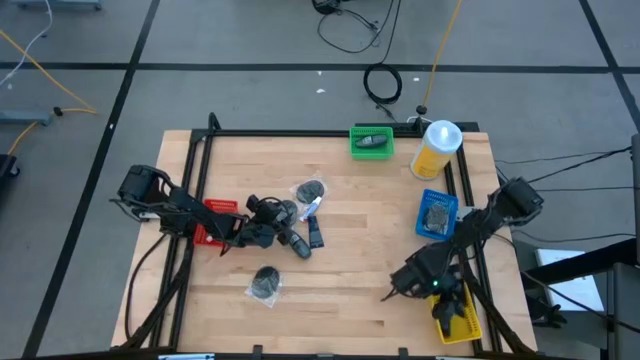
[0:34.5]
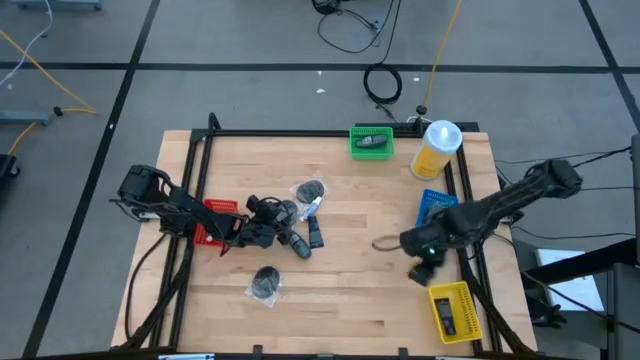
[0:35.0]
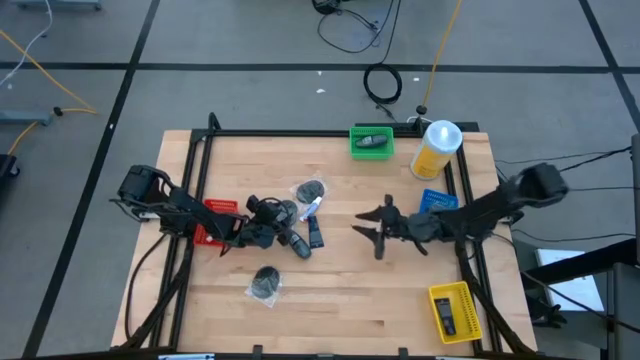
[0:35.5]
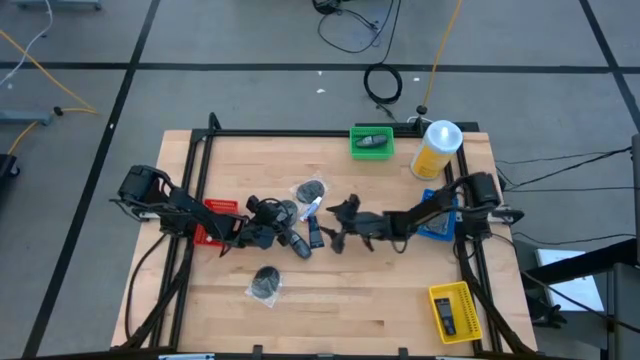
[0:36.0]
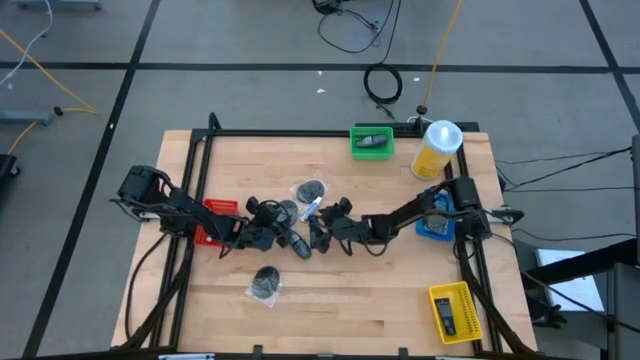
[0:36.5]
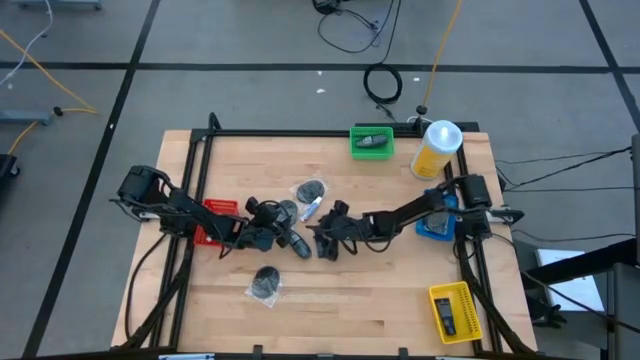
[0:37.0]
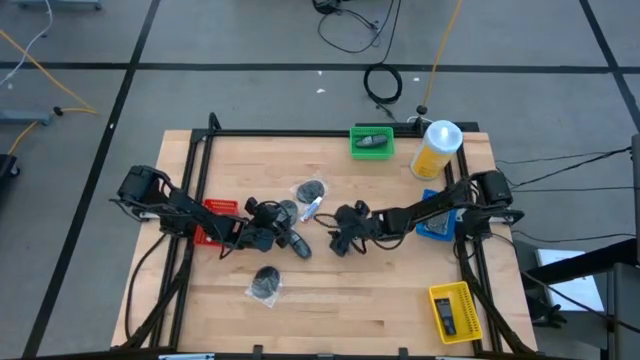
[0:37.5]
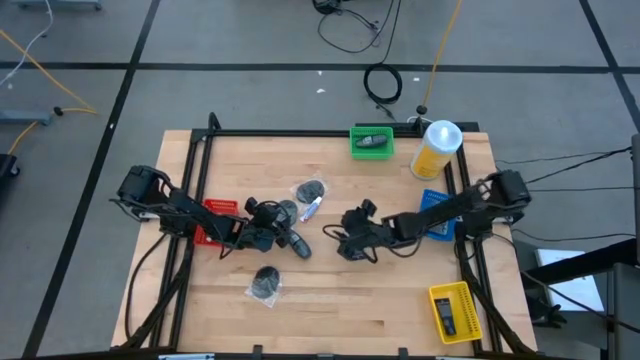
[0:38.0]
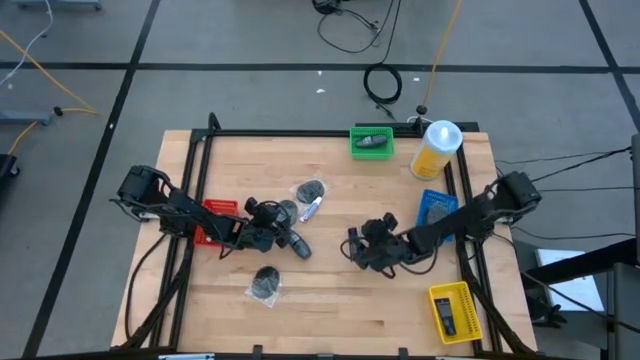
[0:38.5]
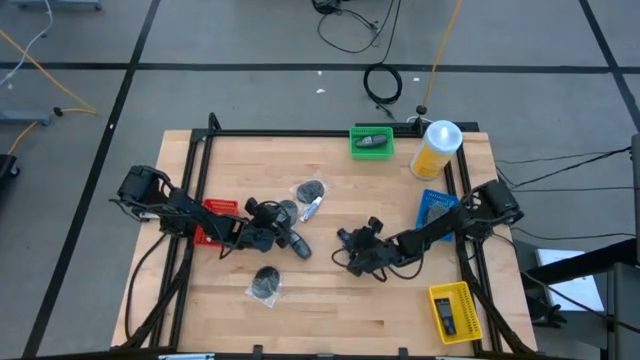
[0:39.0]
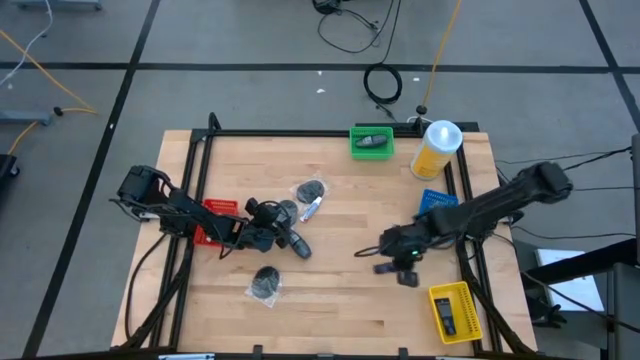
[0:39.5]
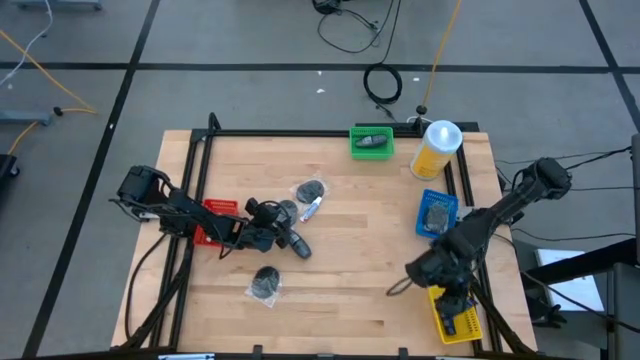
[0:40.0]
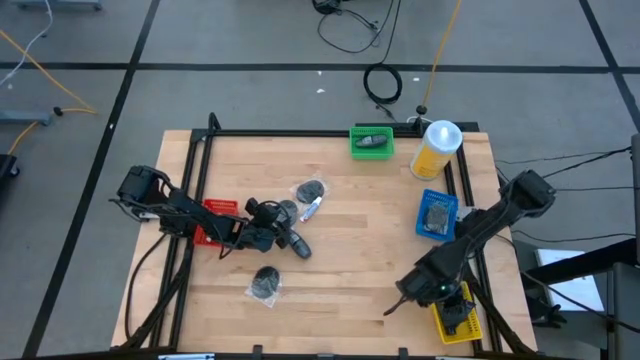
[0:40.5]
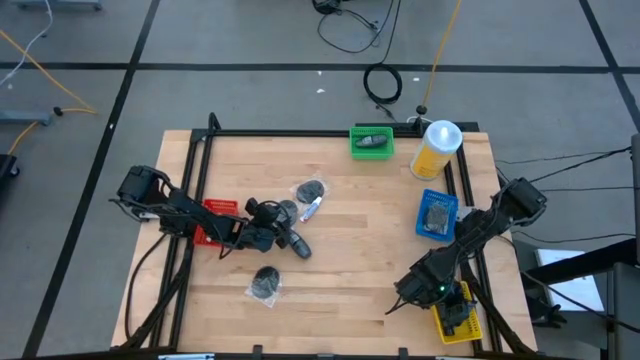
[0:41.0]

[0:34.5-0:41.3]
Task: Pick & Place Travel size toiletries
Put the blue shave cream into the yellow bin

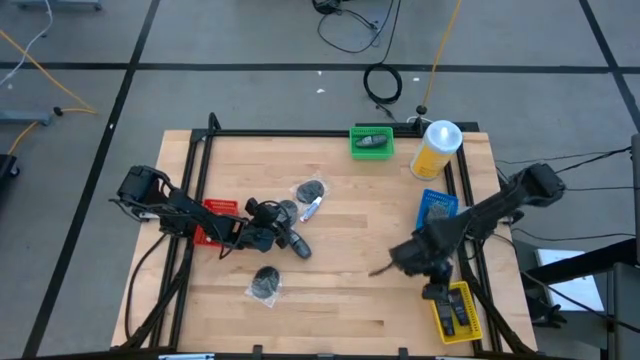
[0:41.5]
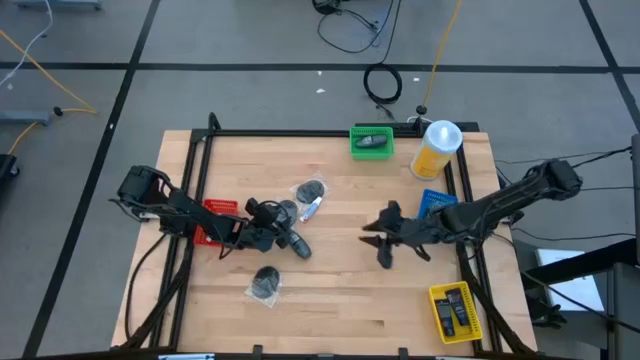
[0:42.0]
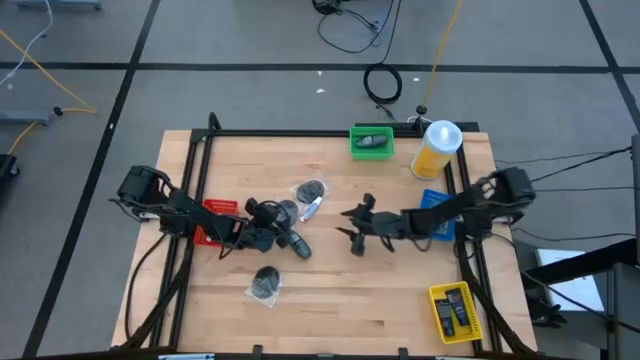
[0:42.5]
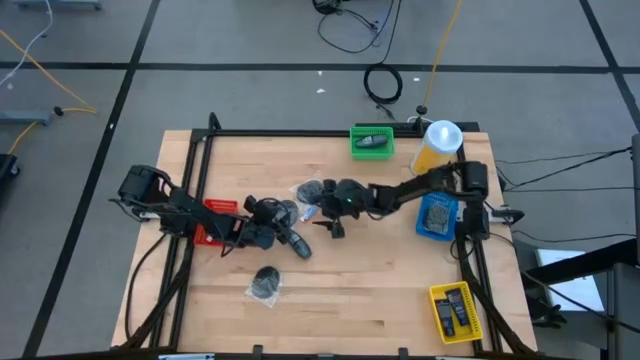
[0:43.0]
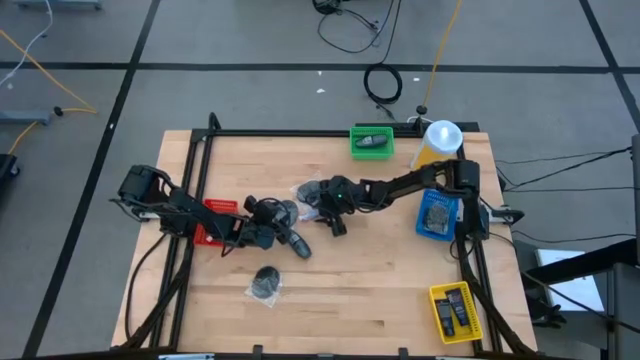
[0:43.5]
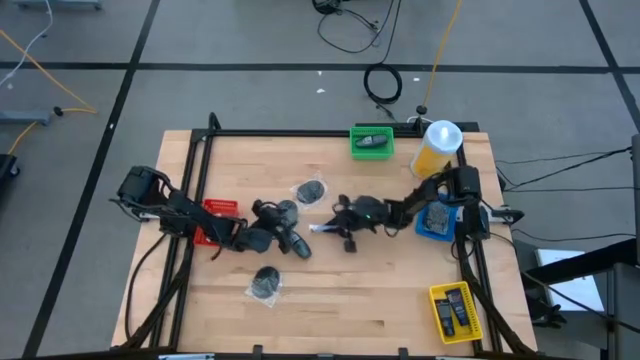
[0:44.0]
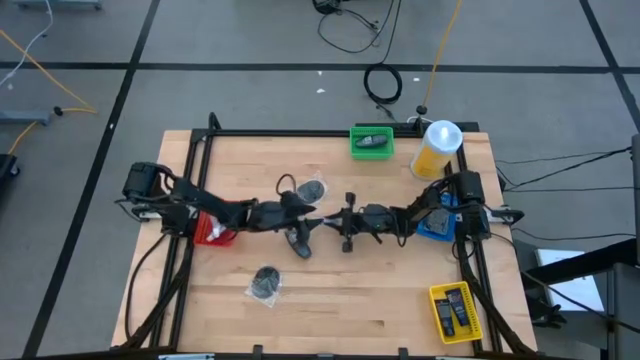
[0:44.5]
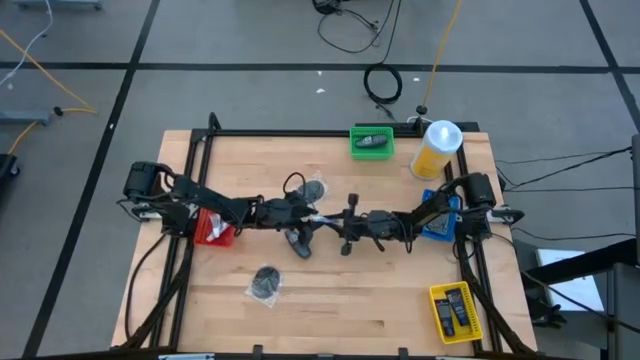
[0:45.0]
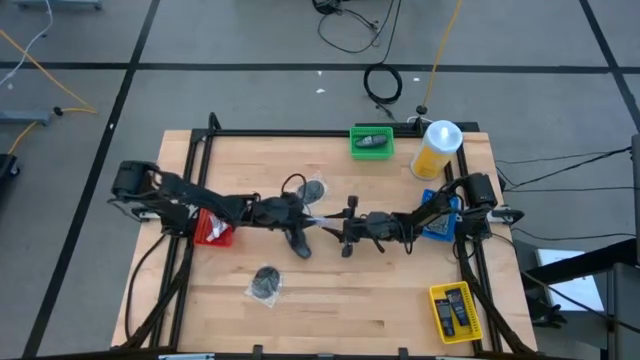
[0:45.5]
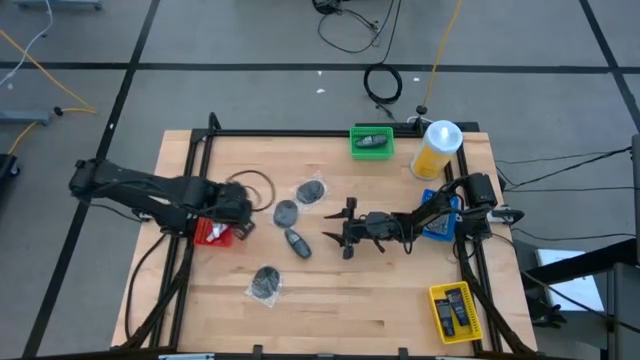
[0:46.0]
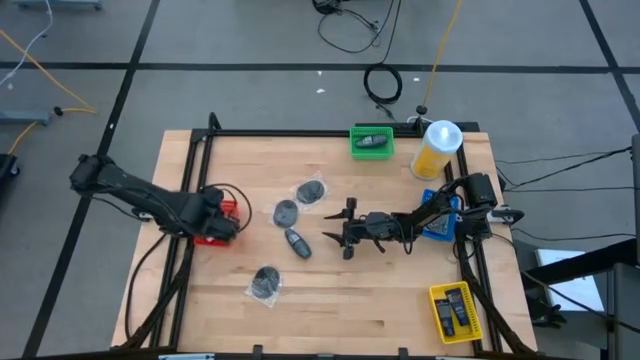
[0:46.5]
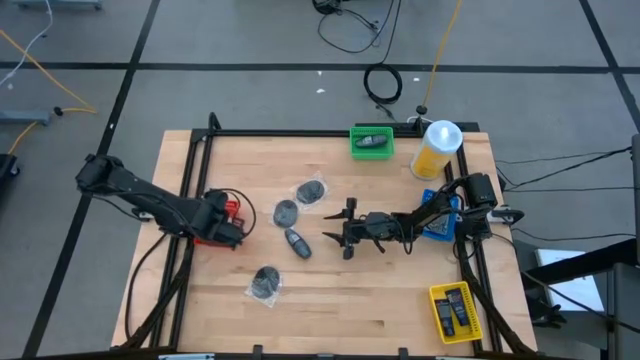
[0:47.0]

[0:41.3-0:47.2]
Put the white toothpaste into the red bin

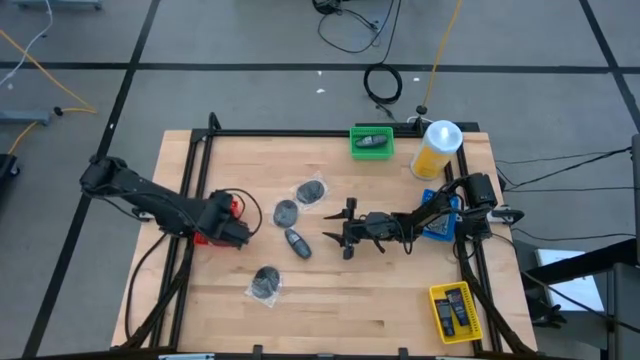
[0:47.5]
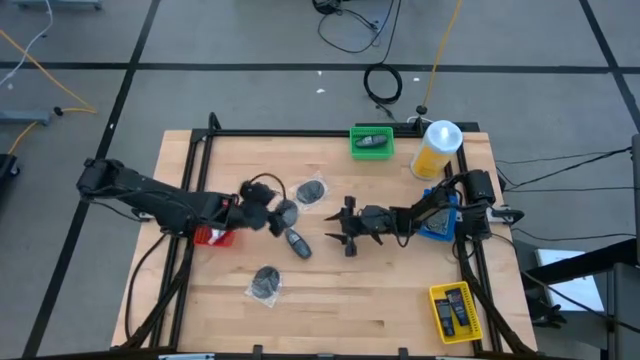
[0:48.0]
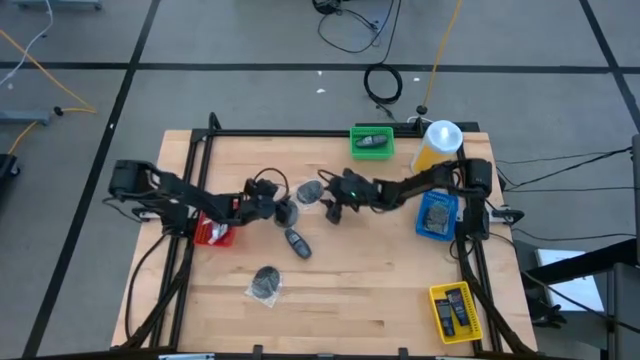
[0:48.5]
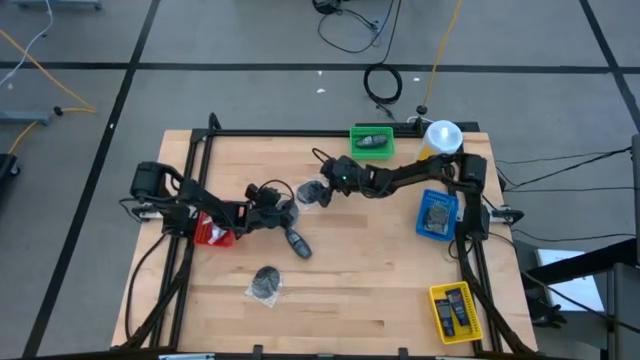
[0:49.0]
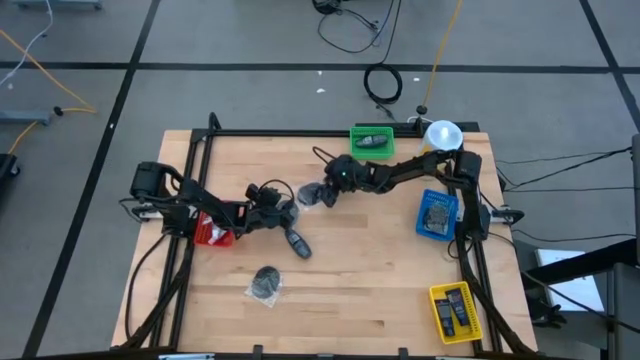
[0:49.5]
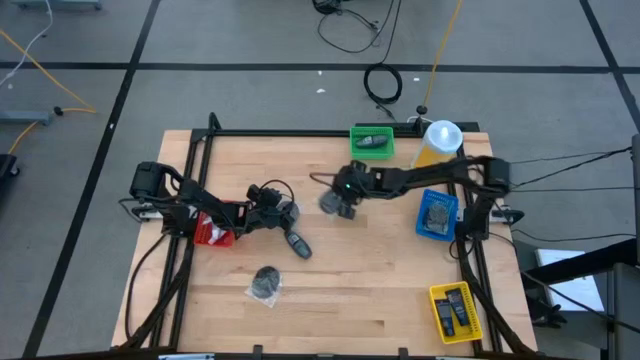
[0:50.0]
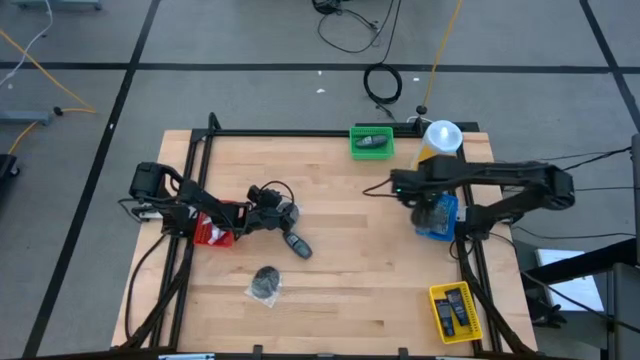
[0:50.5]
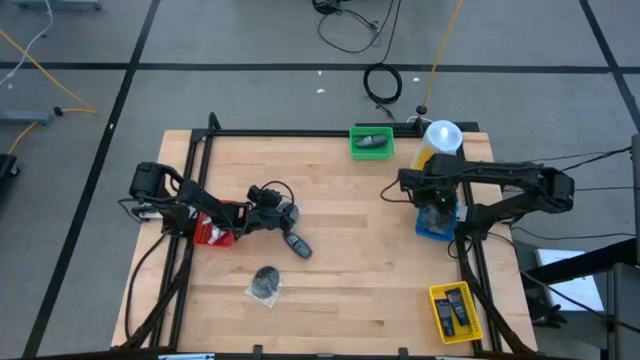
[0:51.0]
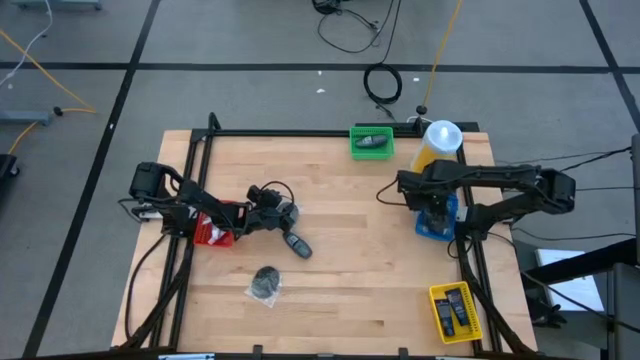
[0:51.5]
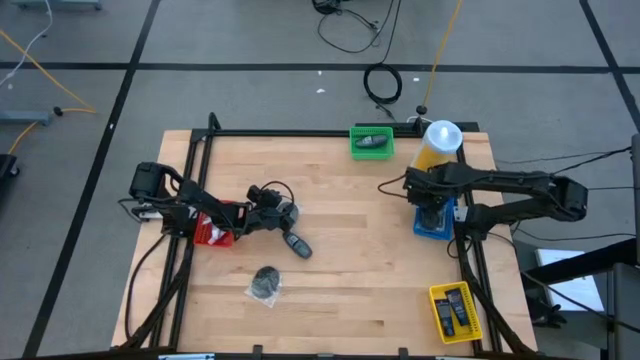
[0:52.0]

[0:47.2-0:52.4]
Put the black hairbrush into the blue bin

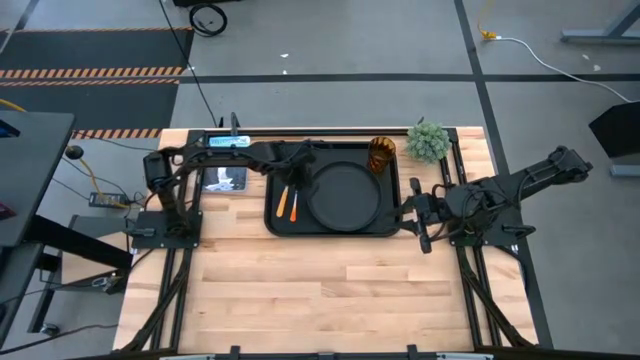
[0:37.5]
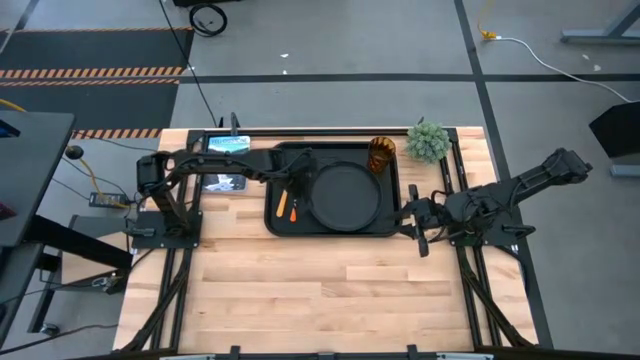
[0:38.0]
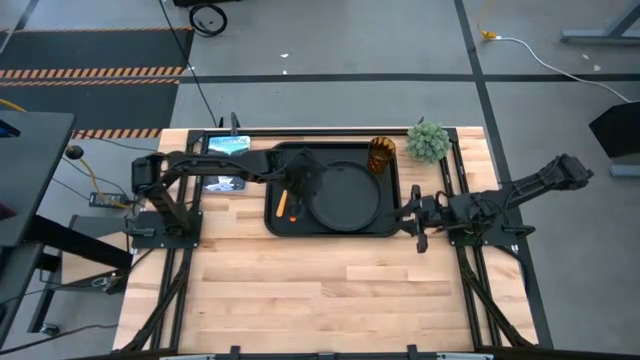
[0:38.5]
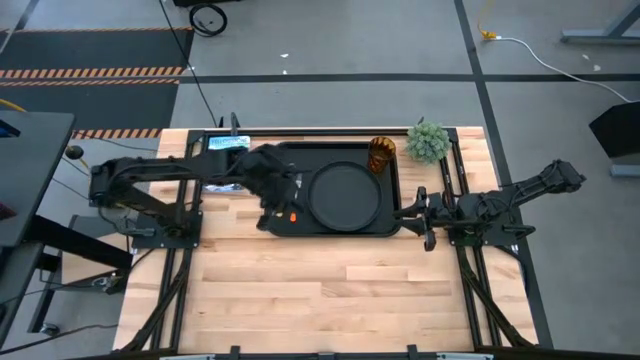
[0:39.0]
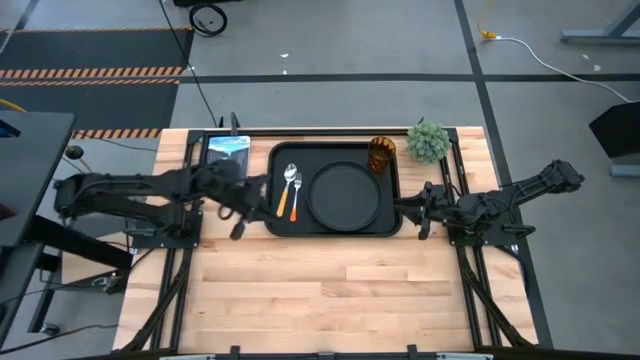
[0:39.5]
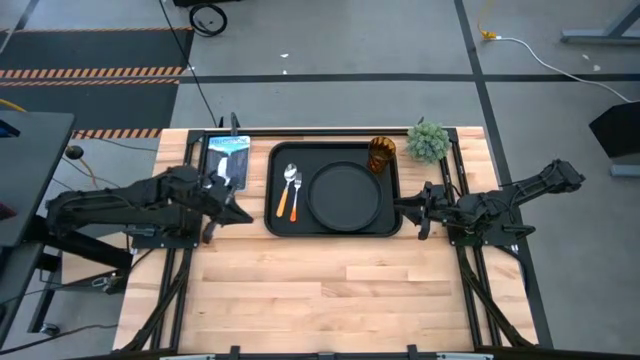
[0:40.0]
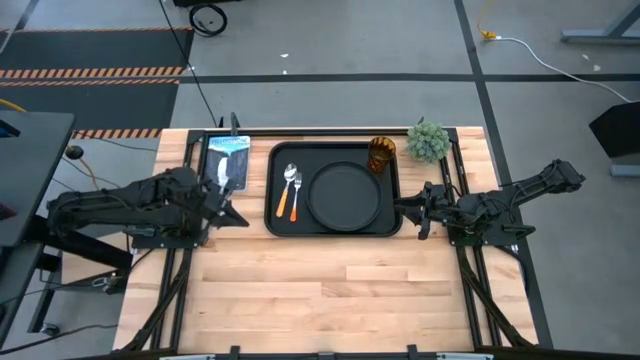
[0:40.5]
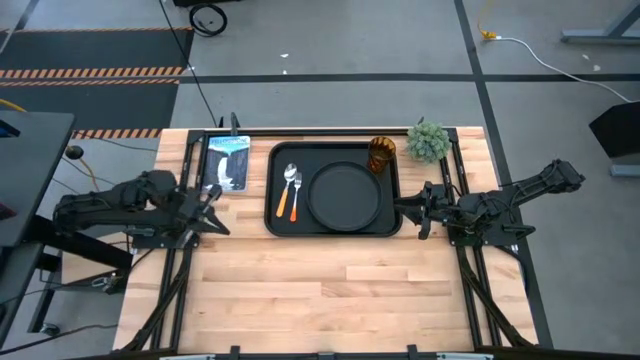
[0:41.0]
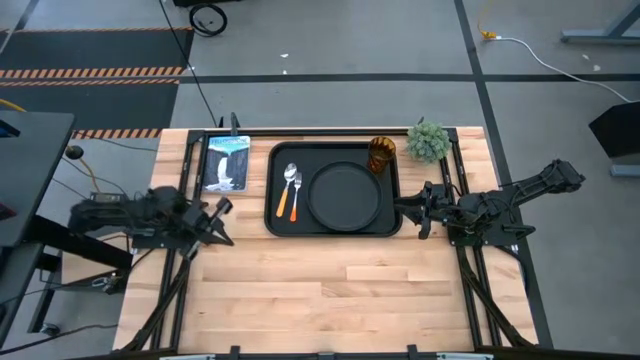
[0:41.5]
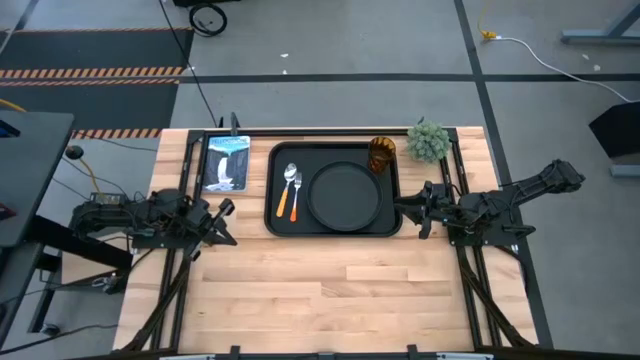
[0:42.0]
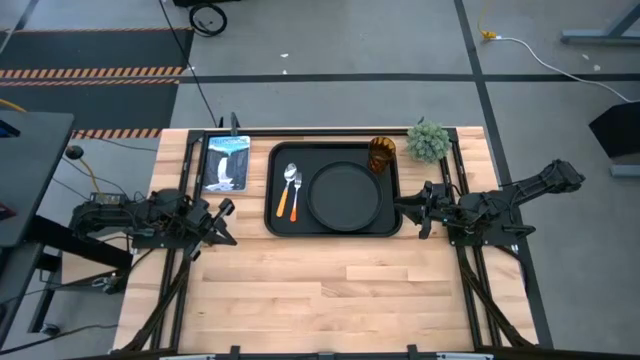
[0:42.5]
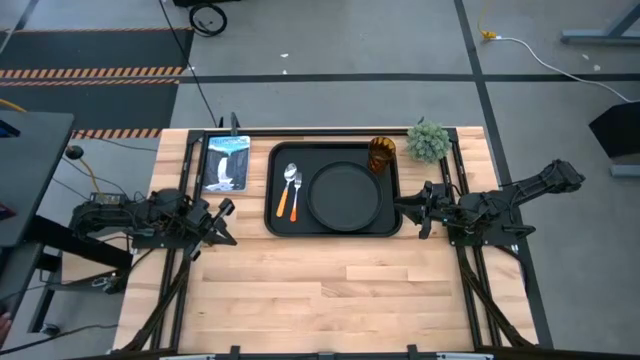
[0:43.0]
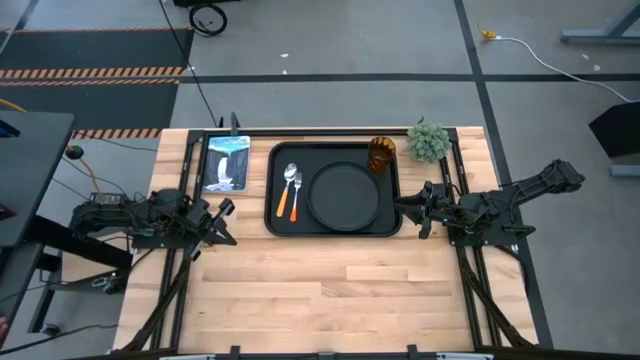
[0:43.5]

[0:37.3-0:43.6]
Task: Pick and place plate/cup/fork/spoon on tray
Return to Home Position
